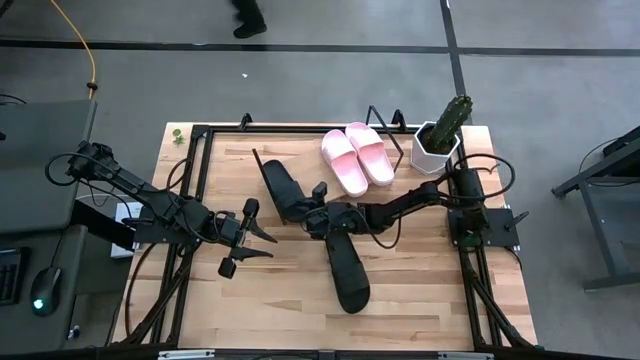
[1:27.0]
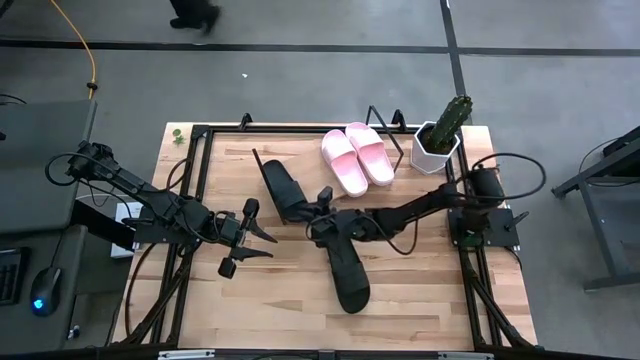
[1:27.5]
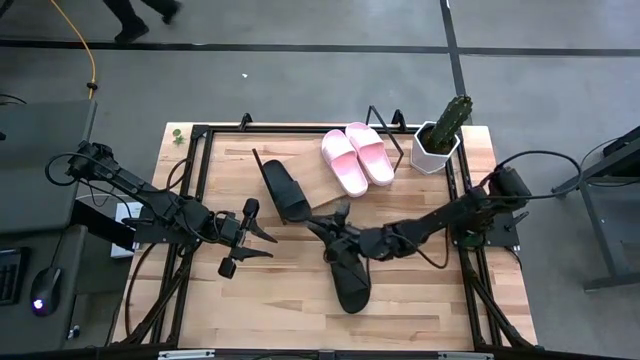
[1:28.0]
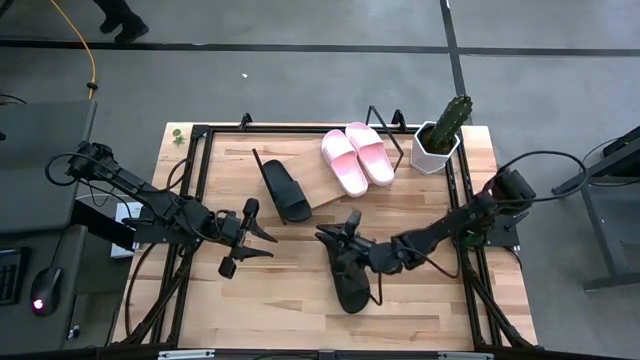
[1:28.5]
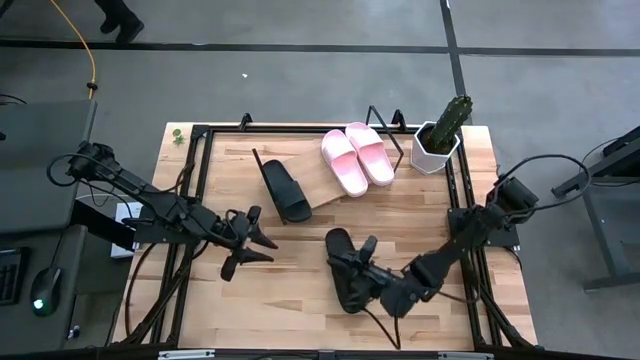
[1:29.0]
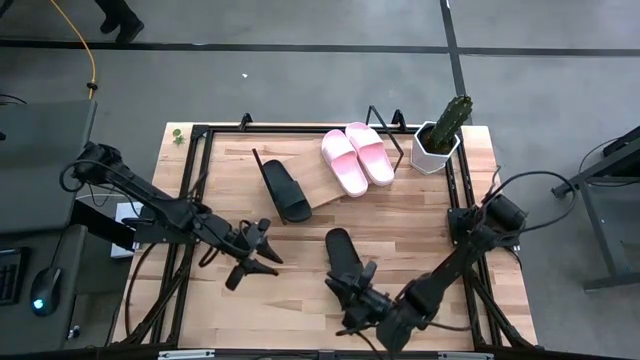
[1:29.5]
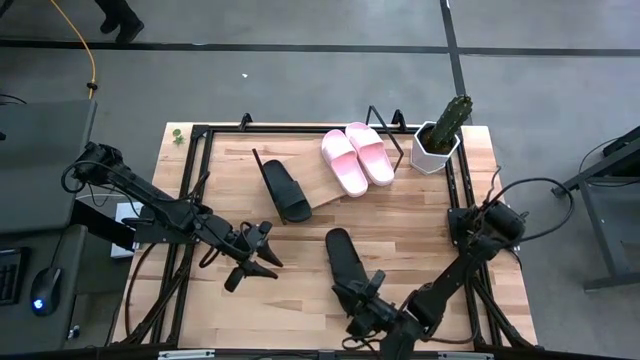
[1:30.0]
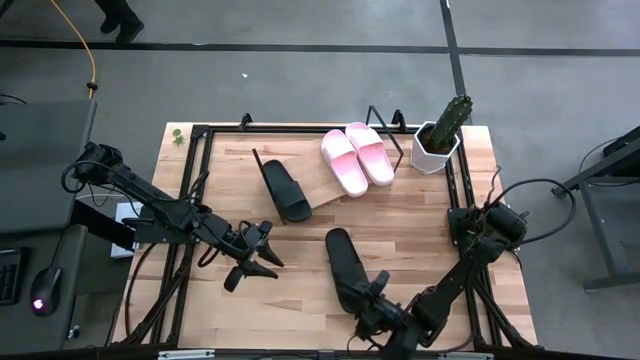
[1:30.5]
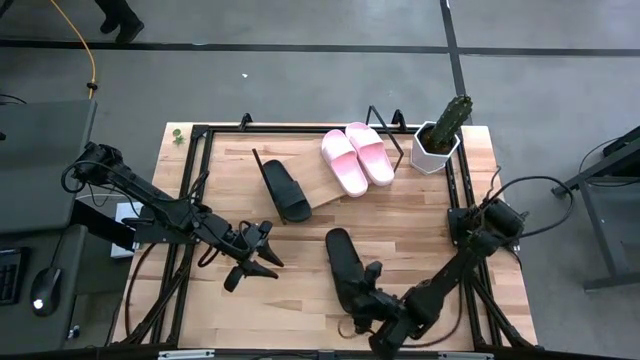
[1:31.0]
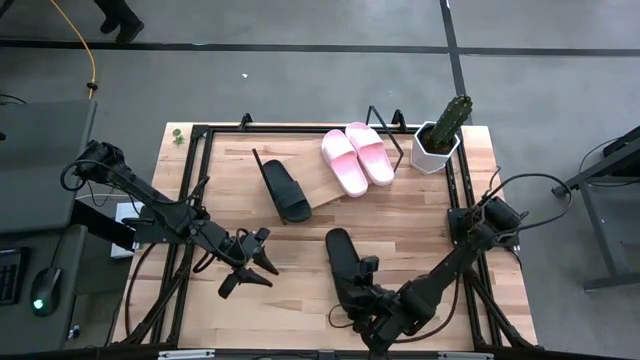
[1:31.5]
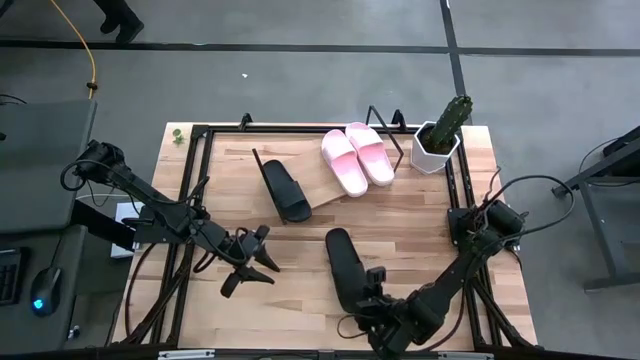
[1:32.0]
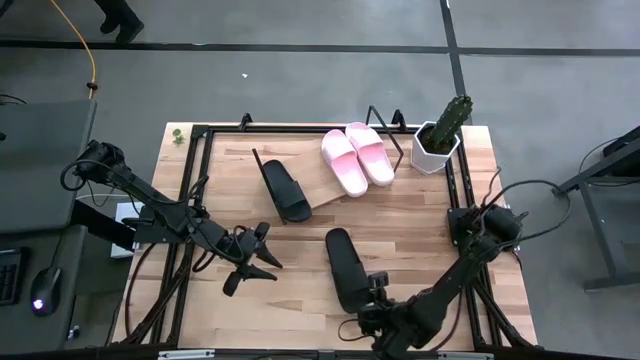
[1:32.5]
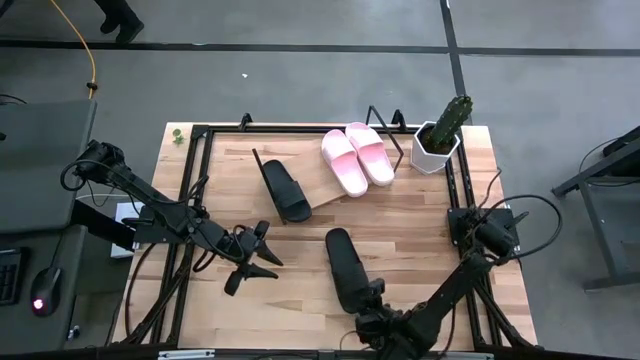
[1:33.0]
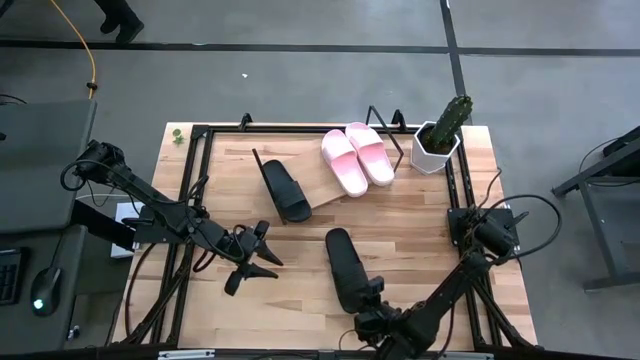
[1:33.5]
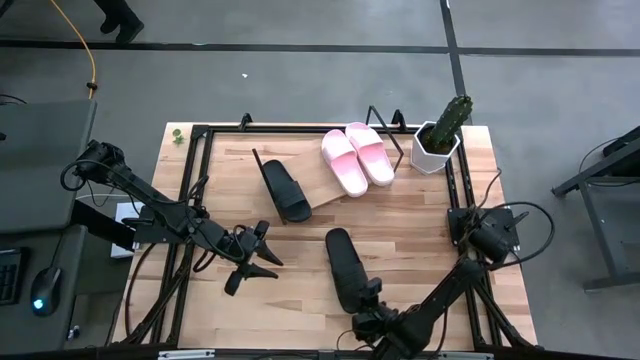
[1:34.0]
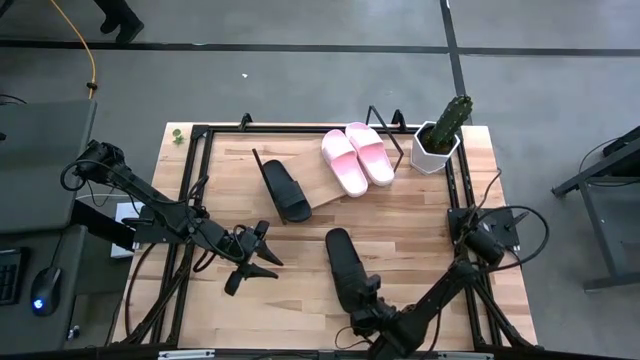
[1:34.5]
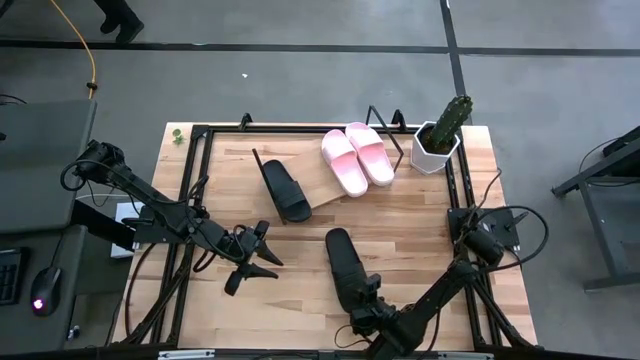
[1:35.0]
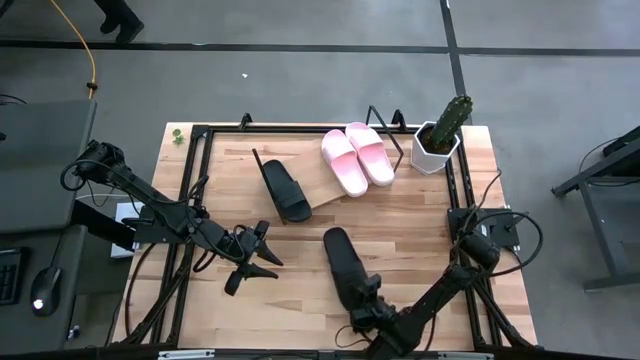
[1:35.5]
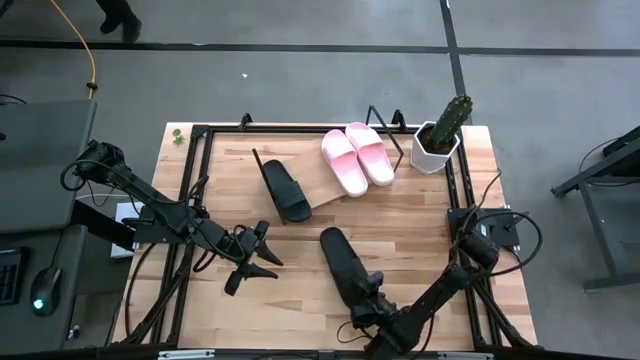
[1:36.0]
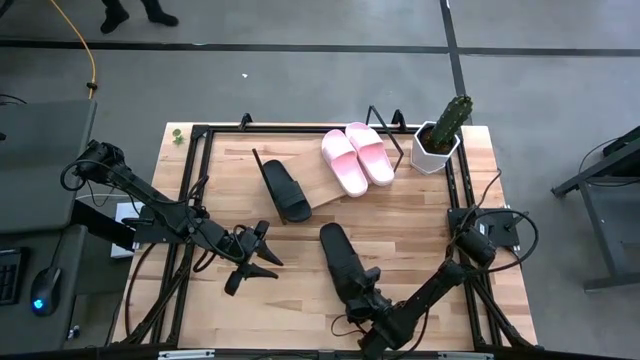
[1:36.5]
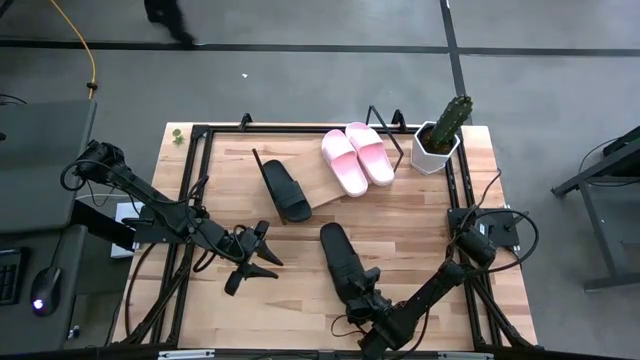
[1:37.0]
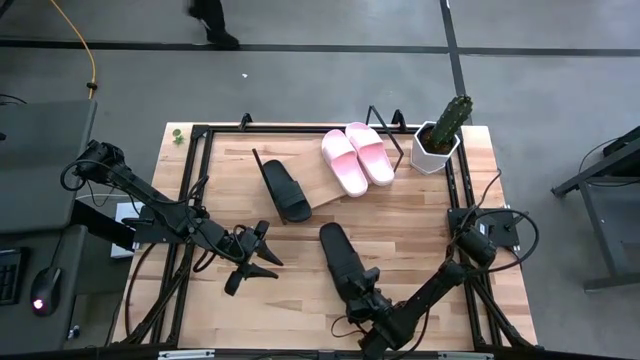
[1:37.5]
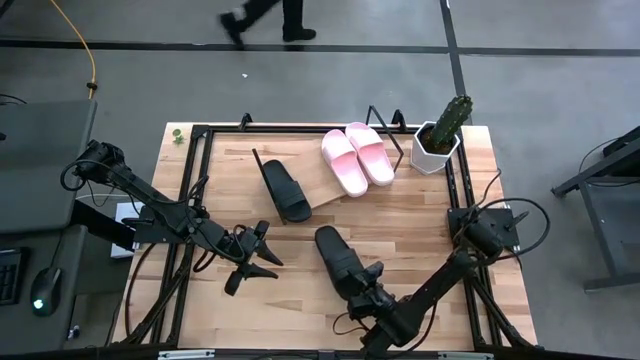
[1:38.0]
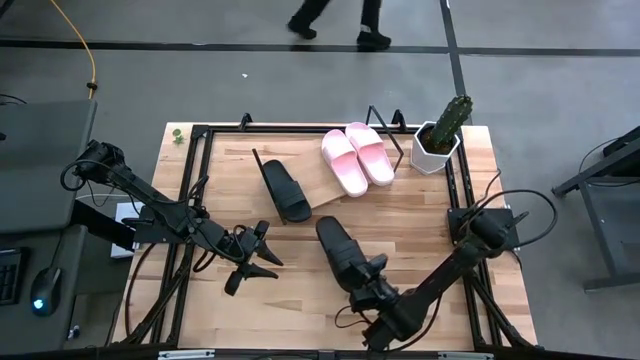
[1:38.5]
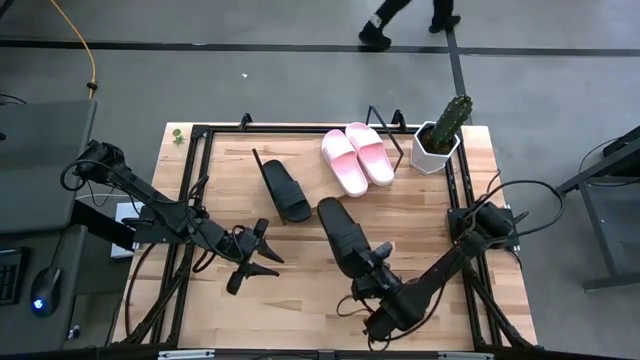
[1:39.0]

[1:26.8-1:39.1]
Task: Pick and place slides into the shelf
Put the black slide on the shelf

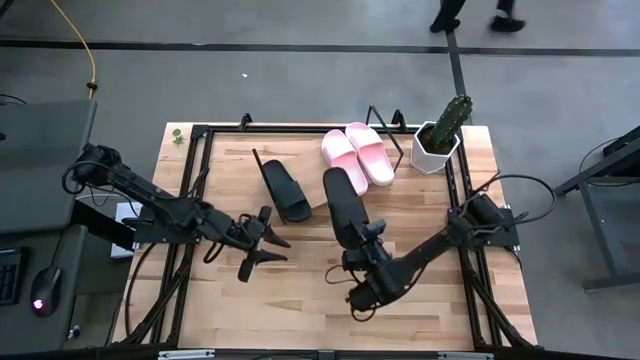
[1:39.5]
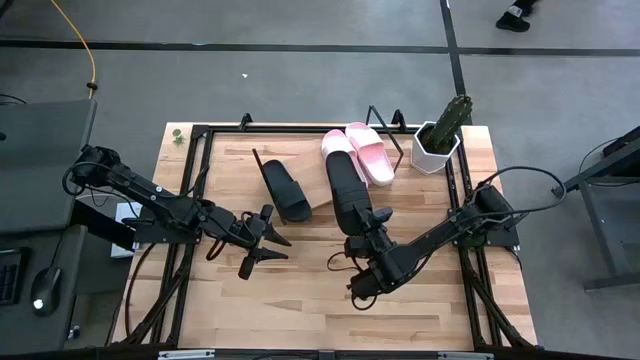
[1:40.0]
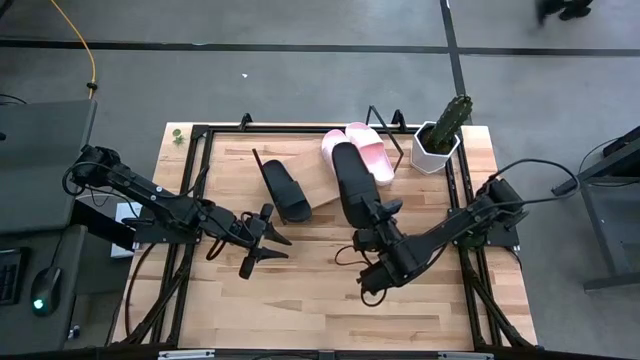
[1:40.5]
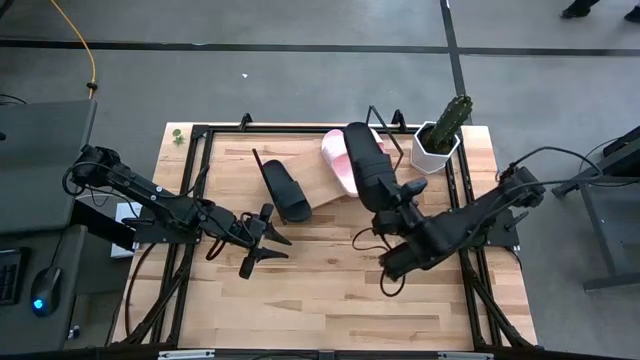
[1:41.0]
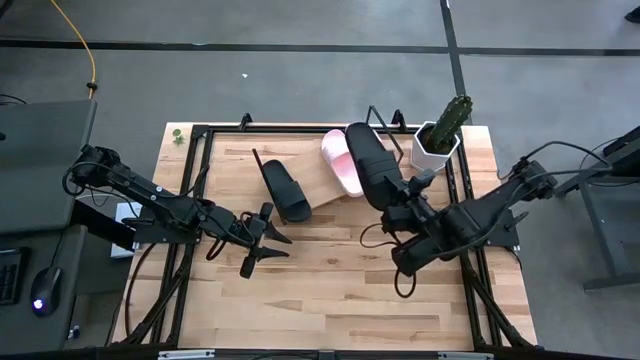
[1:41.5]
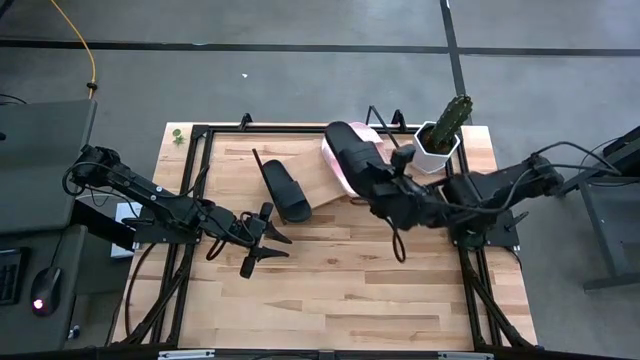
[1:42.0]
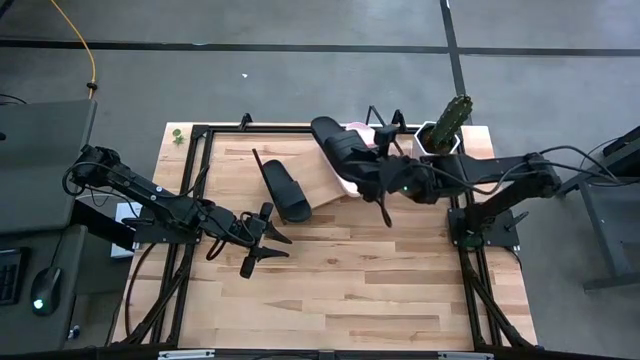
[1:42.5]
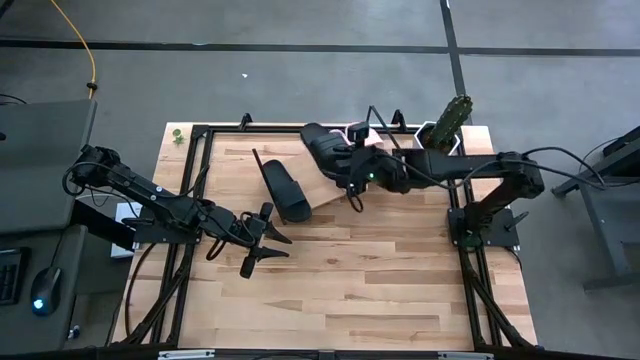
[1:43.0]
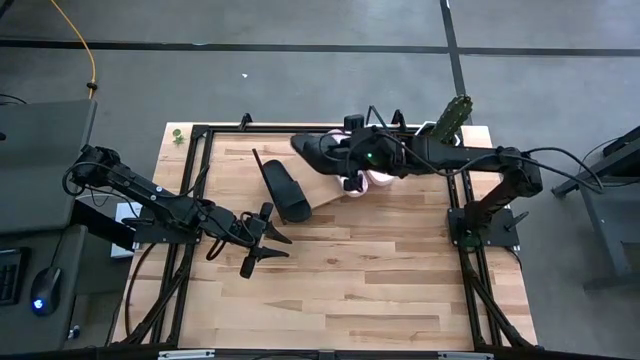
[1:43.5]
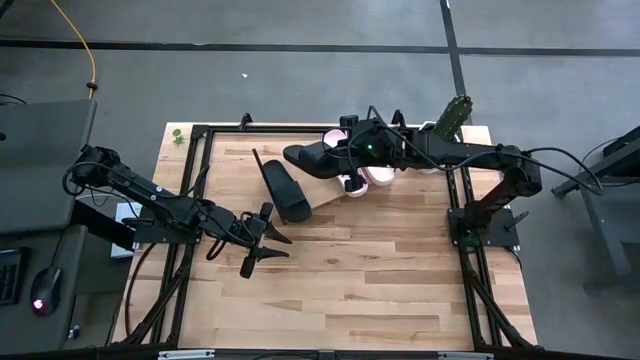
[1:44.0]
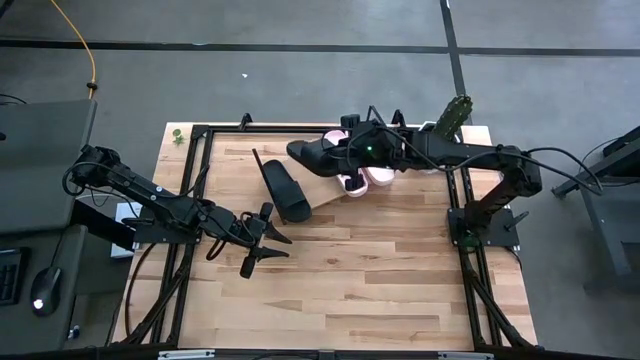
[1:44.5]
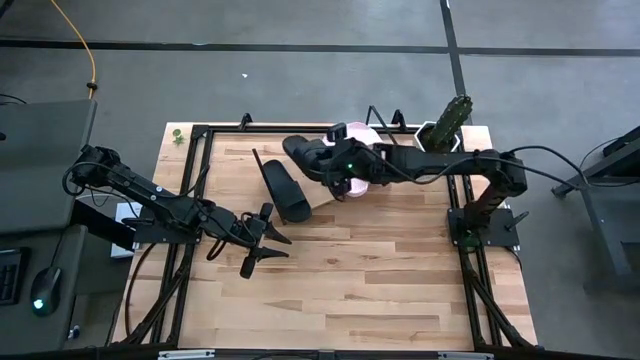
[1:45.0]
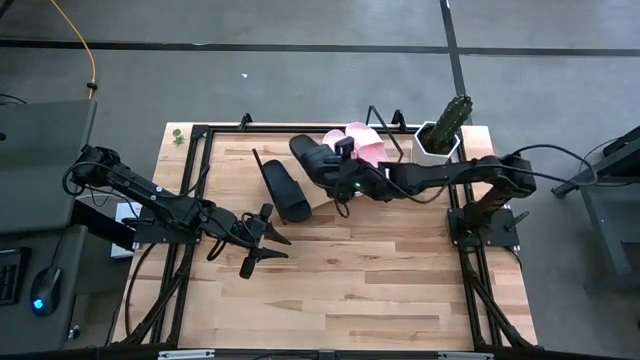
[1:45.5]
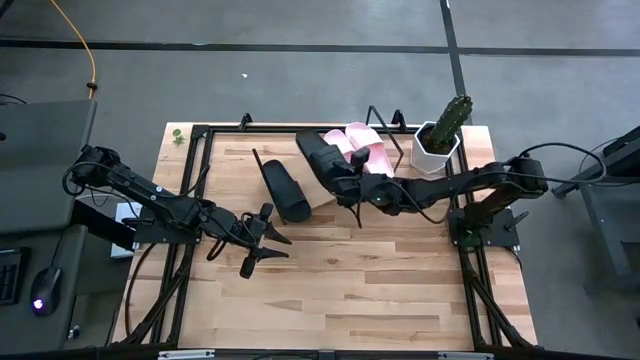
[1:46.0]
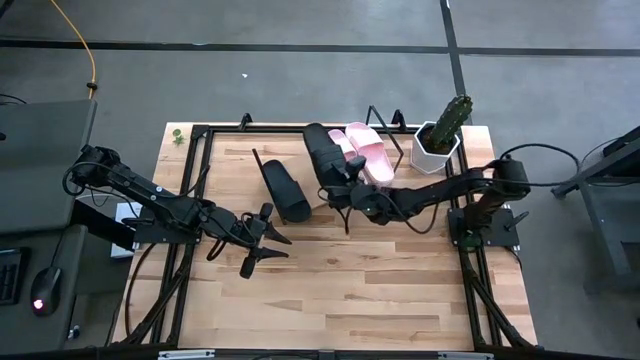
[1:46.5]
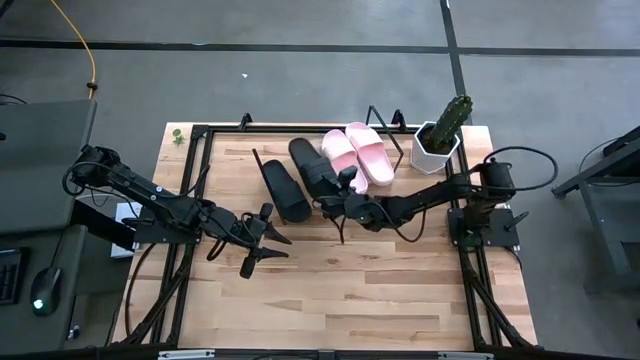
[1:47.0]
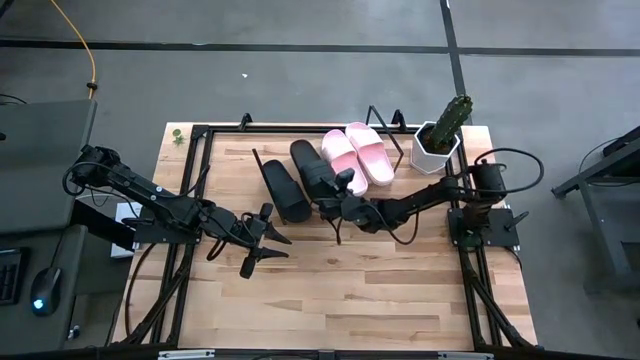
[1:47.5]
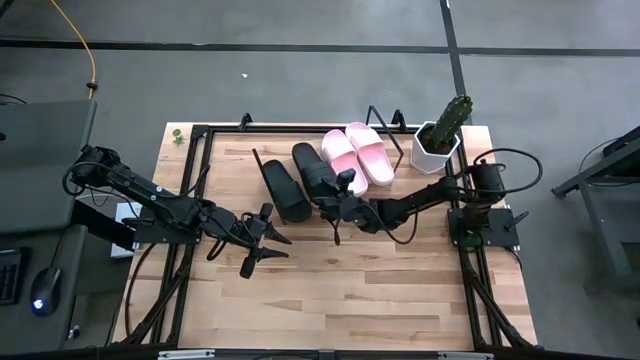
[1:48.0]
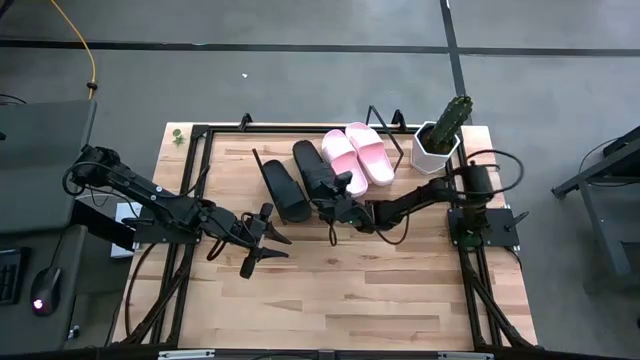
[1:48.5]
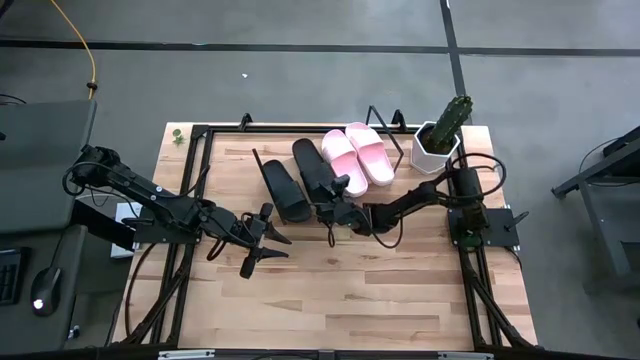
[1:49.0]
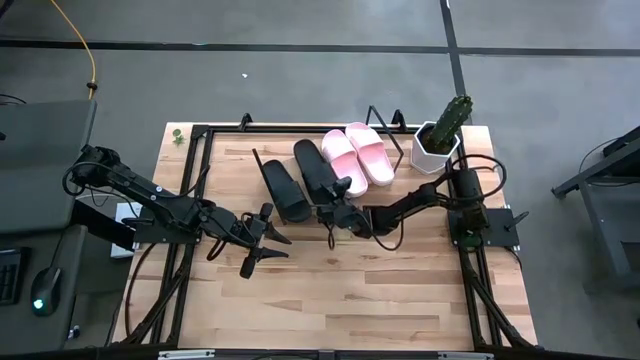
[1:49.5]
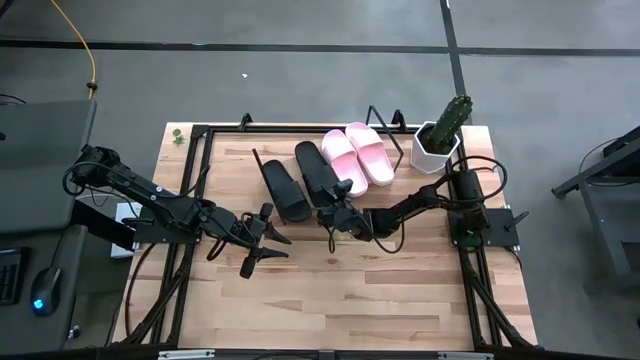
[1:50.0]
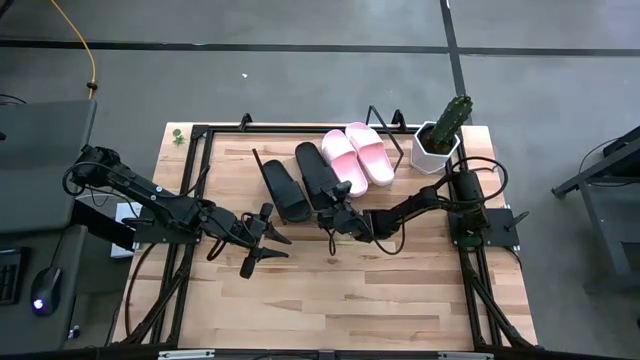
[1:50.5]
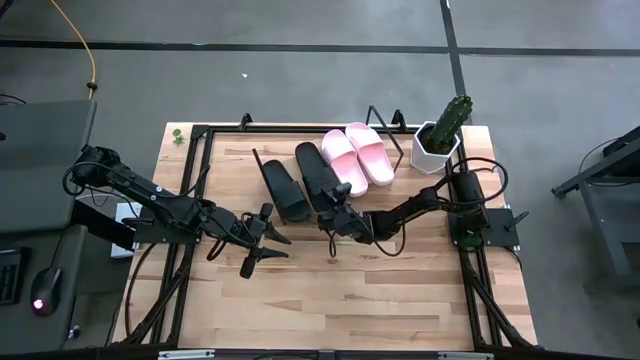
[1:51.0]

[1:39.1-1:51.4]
Put the black slide on the shelf
